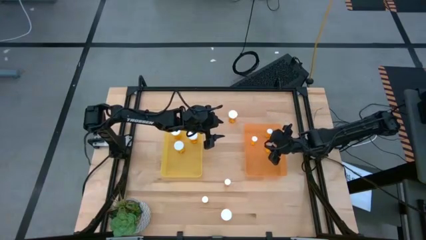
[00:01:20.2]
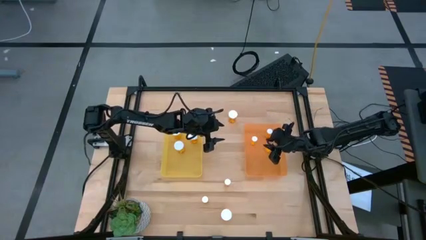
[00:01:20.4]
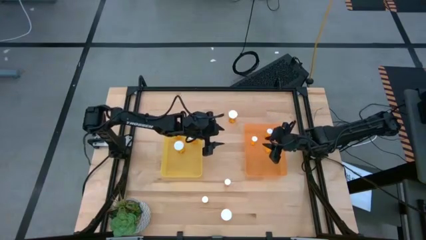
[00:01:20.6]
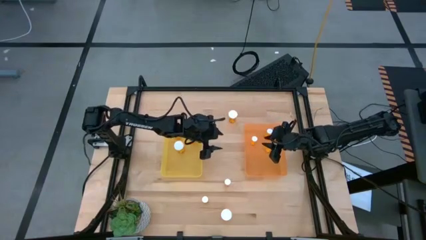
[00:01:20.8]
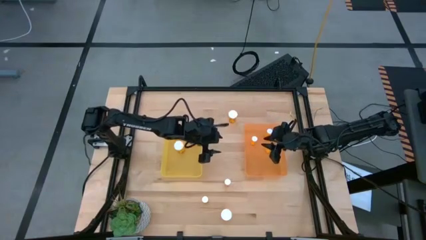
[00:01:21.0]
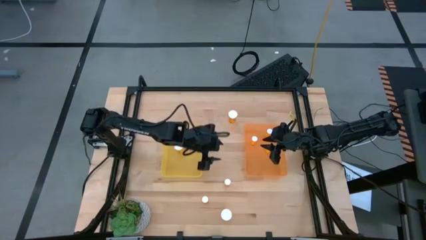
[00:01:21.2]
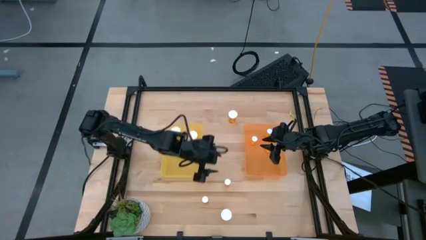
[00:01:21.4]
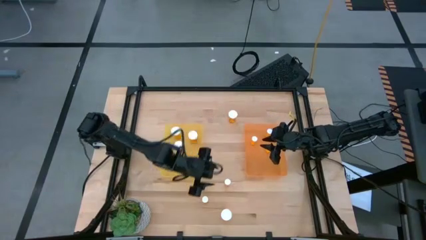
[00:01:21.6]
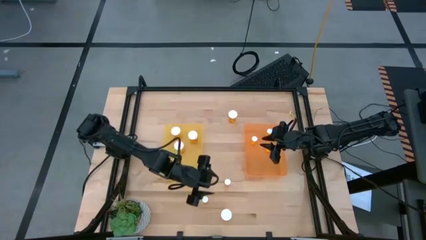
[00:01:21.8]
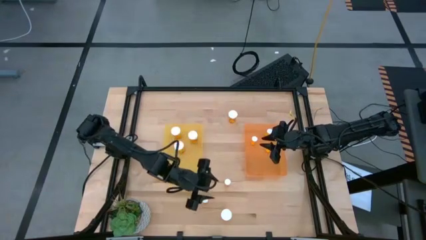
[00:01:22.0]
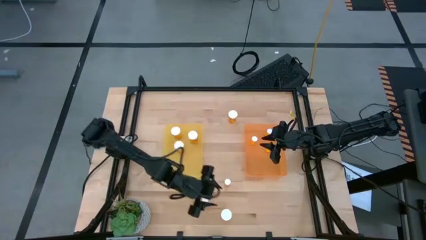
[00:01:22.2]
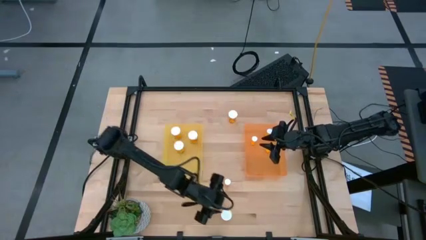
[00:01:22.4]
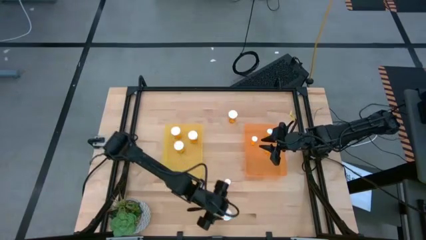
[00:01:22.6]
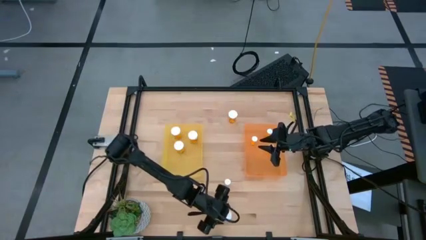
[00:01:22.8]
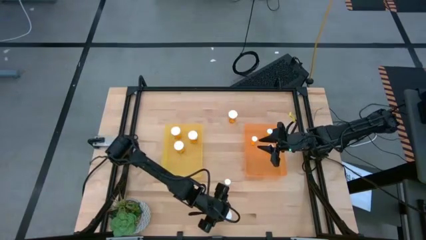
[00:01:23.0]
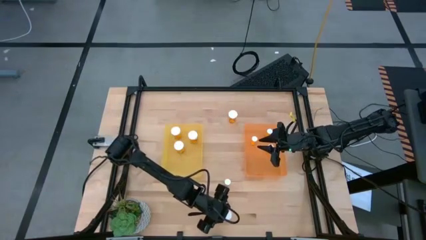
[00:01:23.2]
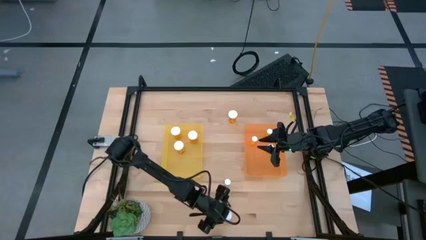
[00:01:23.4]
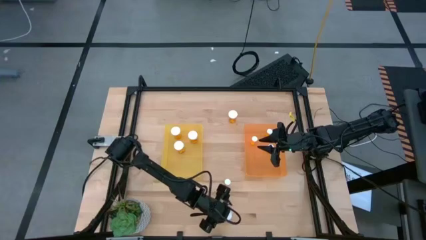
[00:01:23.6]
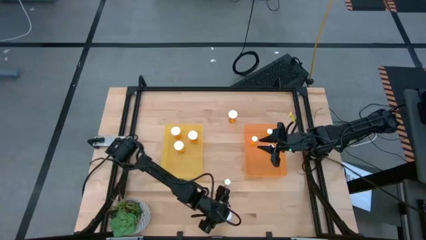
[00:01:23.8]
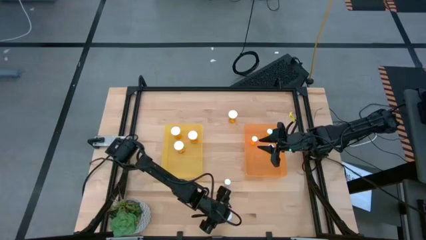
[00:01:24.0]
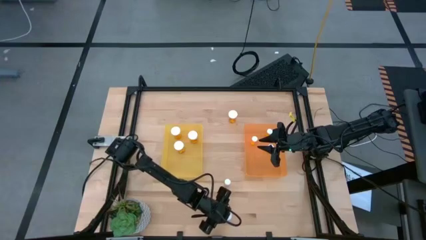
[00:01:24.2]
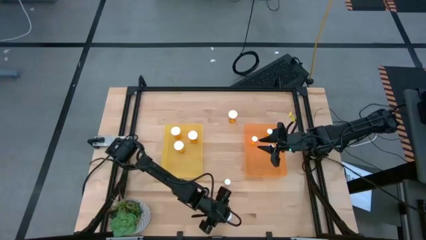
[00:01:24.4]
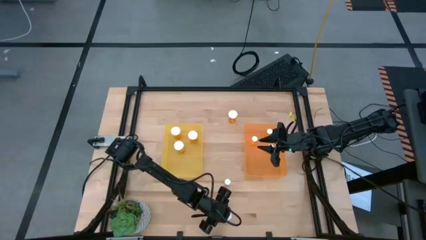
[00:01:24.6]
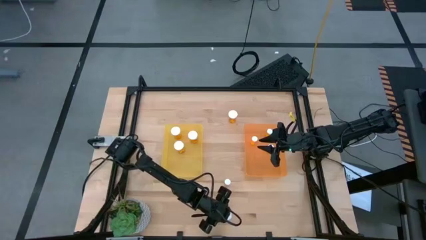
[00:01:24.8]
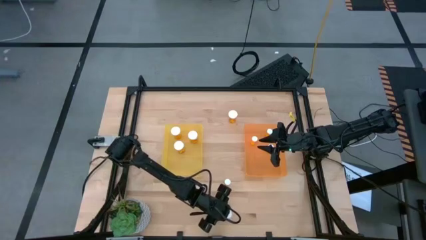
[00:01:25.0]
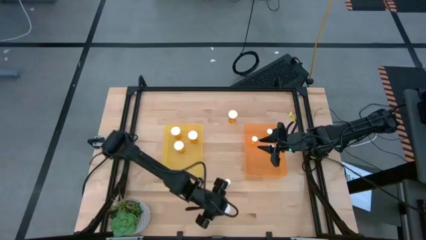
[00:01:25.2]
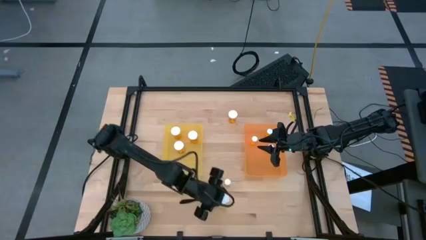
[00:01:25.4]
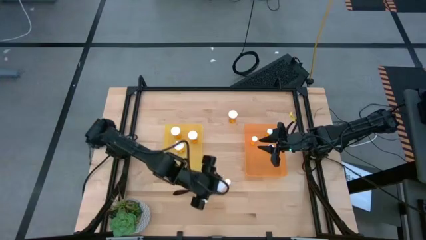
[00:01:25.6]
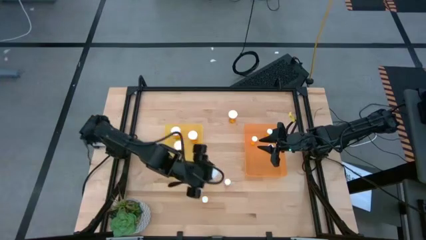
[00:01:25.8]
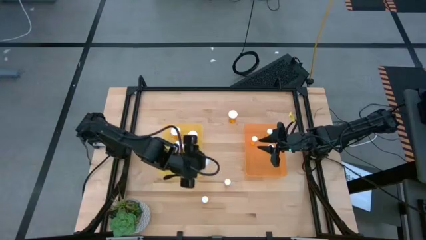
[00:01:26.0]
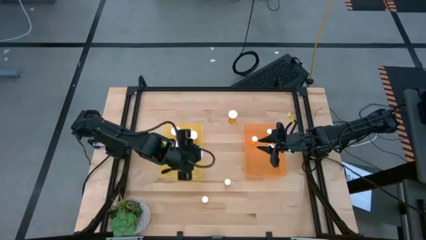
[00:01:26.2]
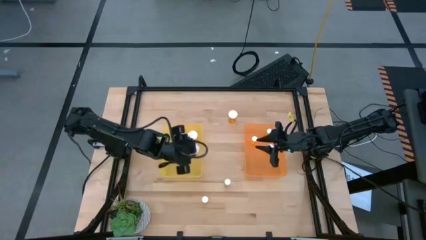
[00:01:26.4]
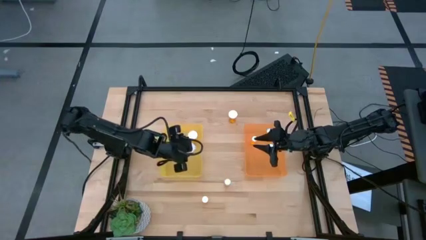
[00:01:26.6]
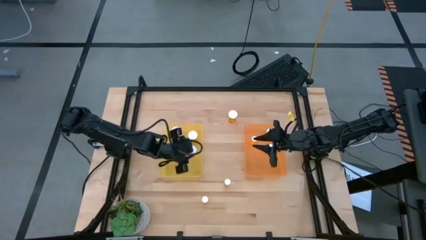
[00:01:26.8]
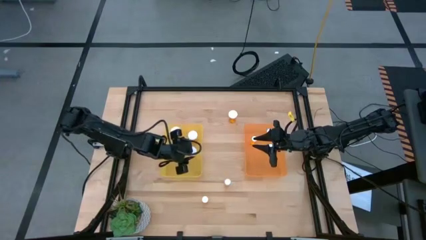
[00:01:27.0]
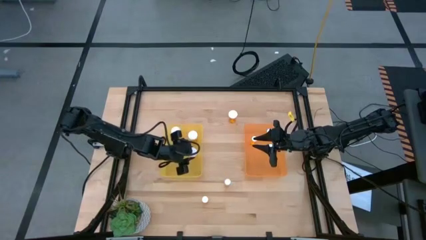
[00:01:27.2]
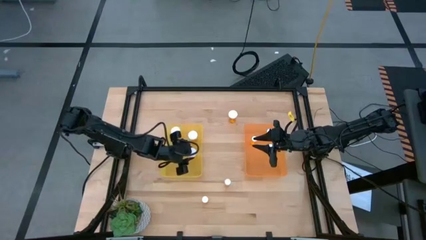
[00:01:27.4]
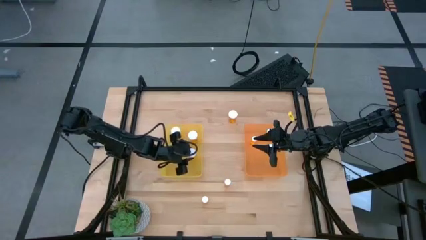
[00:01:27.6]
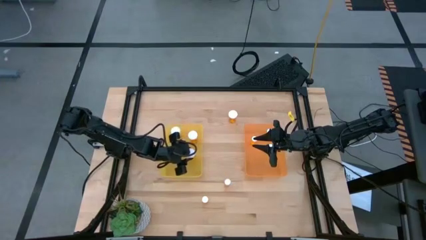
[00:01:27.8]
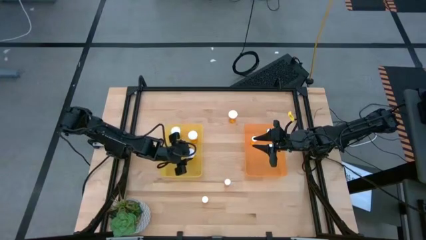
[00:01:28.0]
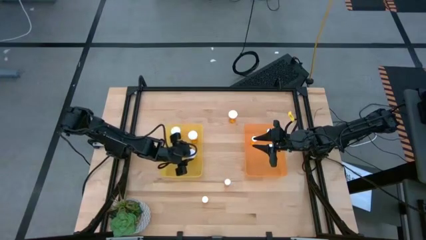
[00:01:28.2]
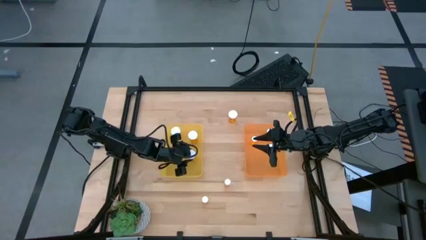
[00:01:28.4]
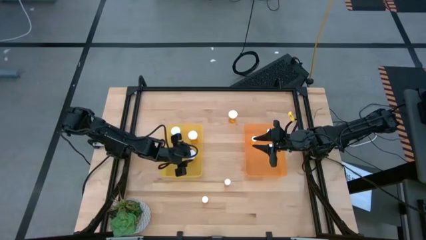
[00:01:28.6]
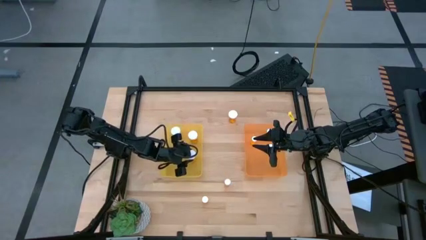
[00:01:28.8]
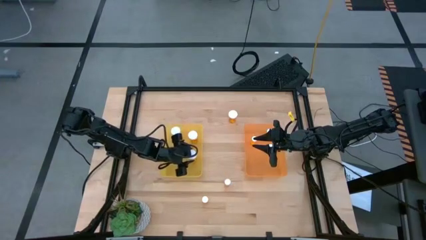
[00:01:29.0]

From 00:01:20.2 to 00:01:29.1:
Task: Pick and place medicine bottles into bin by pill shape (circle, oval)
Put the large orange pill bottle into the yellow bin

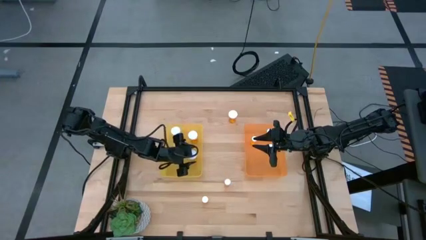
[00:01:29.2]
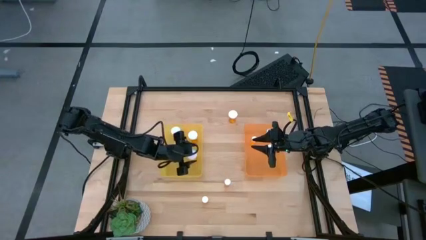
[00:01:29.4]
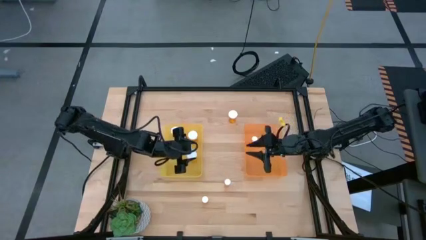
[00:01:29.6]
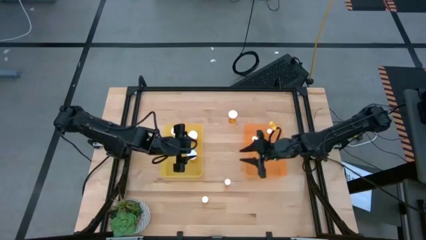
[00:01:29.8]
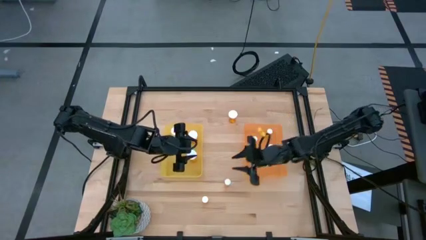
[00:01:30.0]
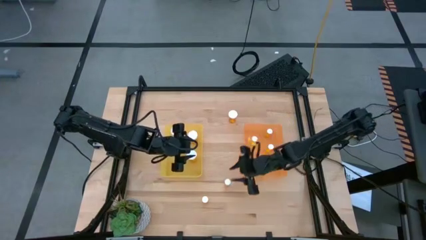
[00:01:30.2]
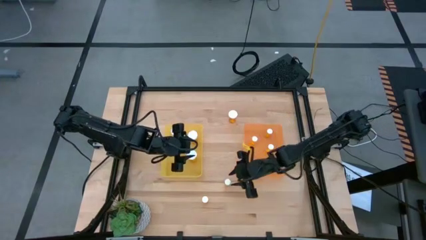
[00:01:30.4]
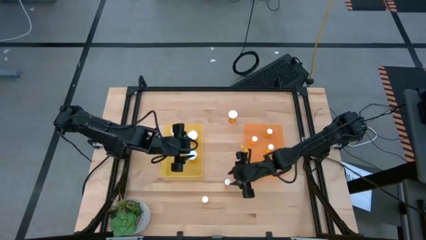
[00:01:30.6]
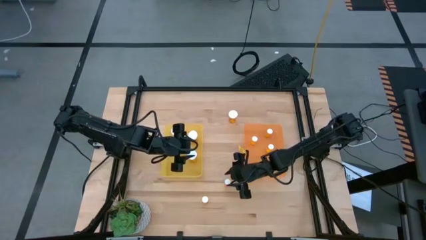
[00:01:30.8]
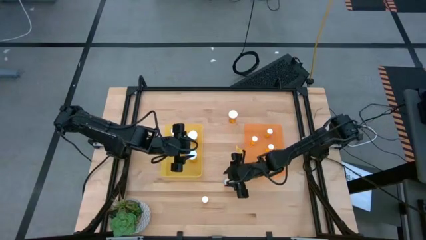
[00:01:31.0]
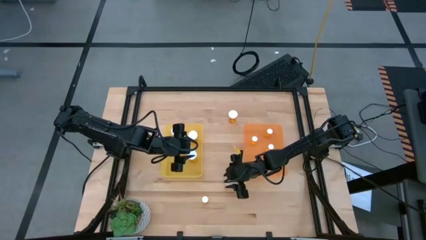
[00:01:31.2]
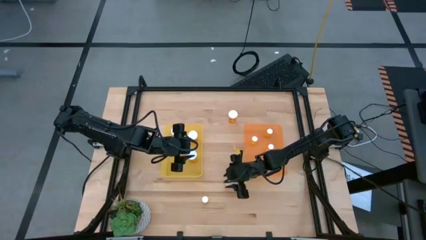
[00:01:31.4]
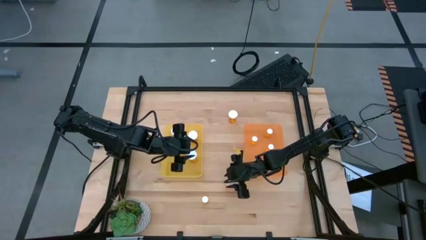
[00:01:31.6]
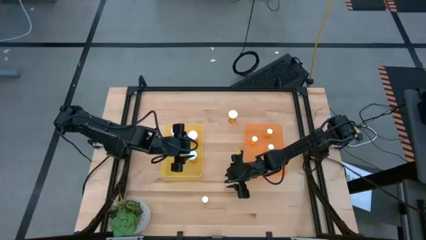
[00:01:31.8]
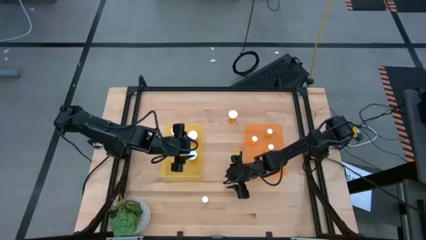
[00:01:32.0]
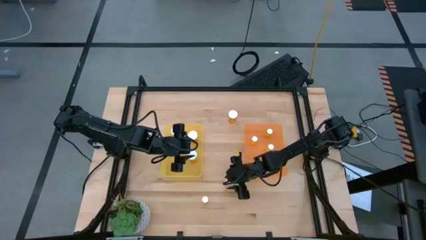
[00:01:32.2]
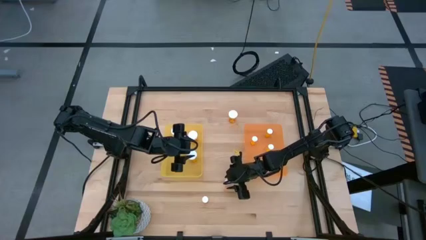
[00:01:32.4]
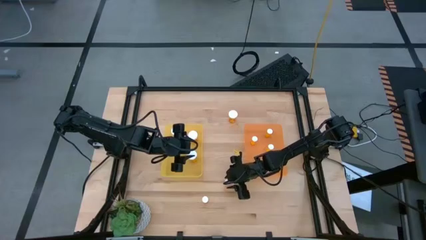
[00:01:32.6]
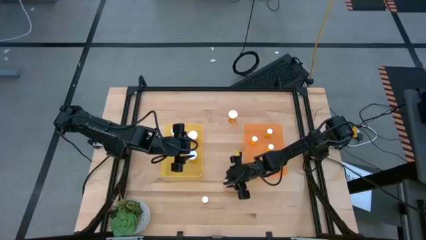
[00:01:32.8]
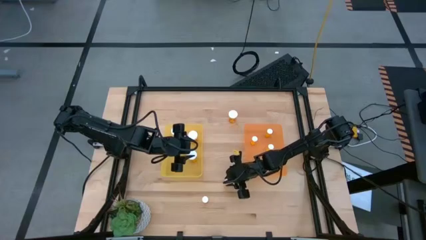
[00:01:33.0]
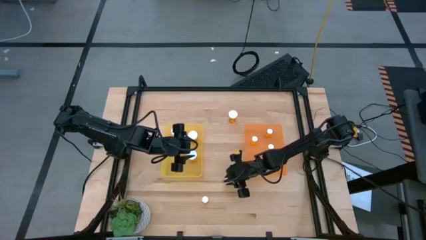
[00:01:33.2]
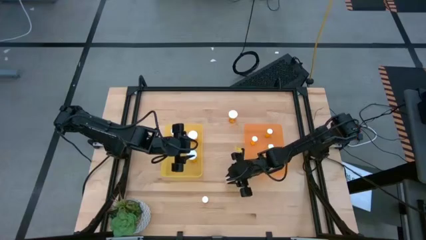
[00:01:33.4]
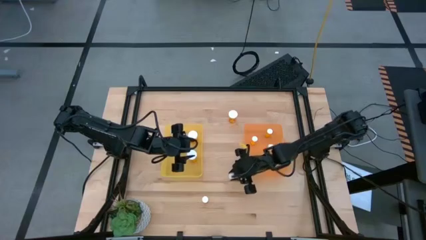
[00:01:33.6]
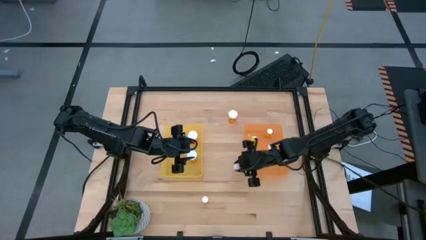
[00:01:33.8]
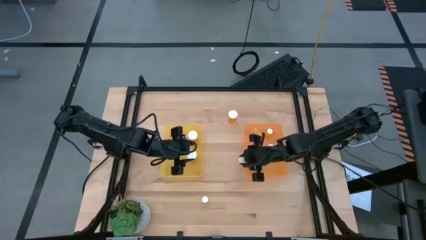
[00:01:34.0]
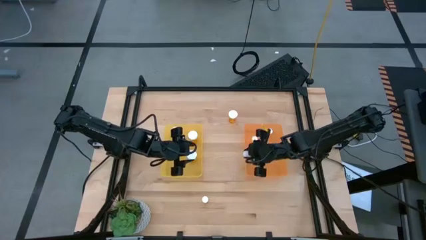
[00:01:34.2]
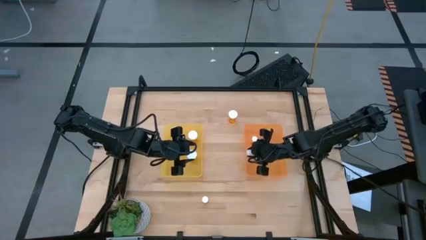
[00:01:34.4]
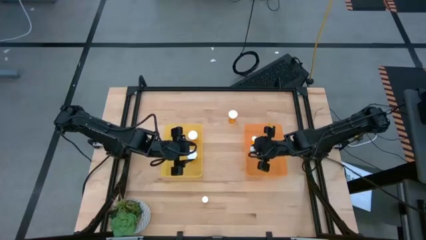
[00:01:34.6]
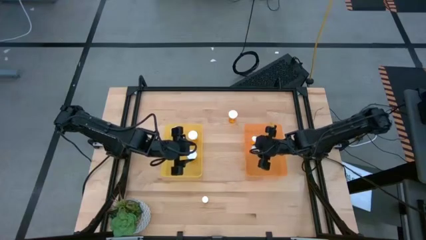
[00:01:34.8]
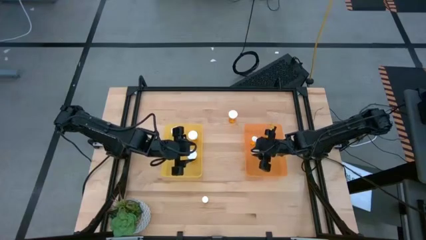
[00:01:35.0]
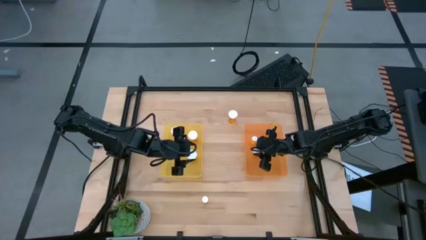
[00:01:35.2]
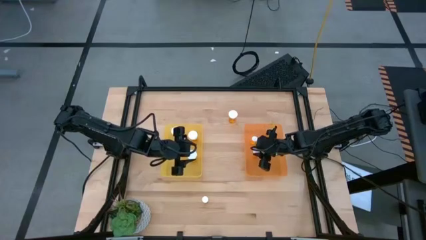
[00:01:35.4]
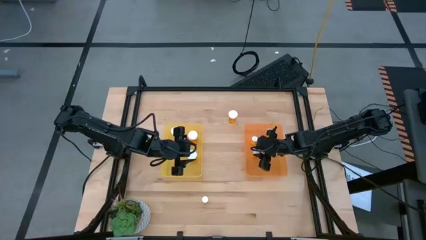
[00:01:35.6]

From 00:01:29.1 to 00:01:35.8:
Put the small orange pill bottle into the orange bin
